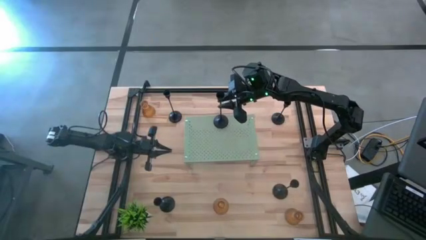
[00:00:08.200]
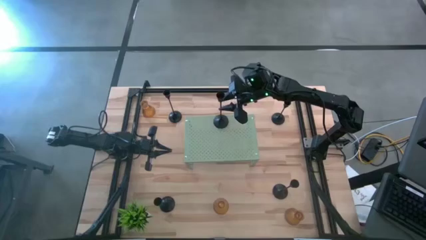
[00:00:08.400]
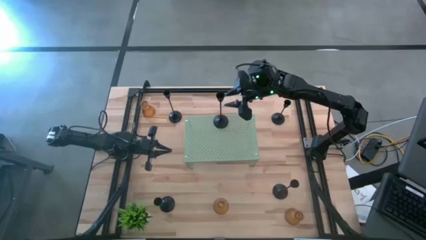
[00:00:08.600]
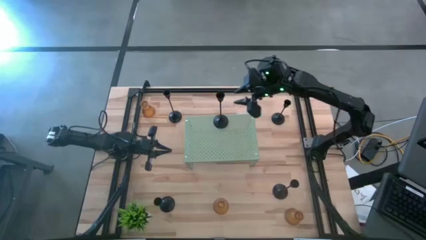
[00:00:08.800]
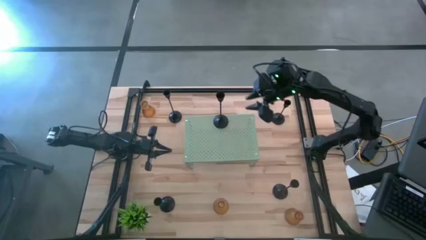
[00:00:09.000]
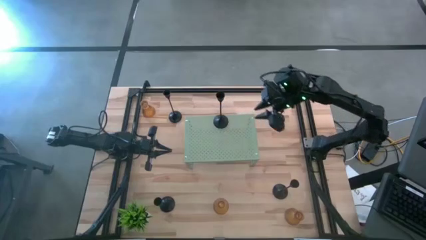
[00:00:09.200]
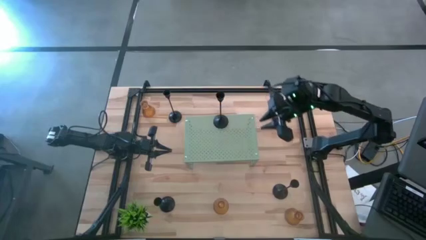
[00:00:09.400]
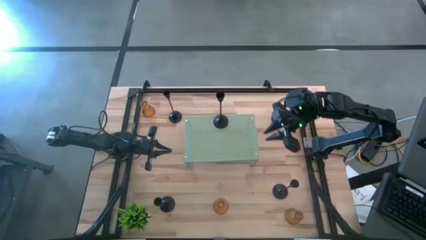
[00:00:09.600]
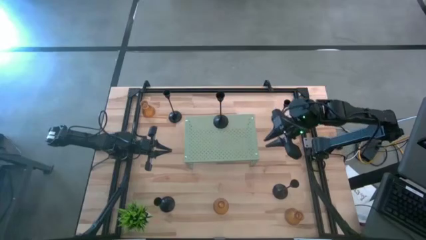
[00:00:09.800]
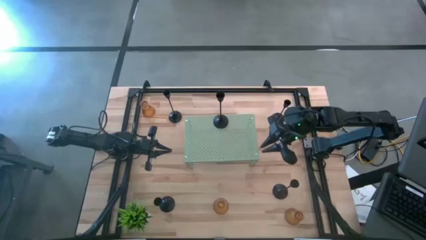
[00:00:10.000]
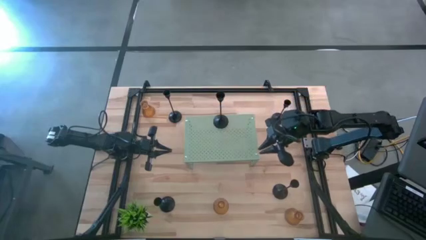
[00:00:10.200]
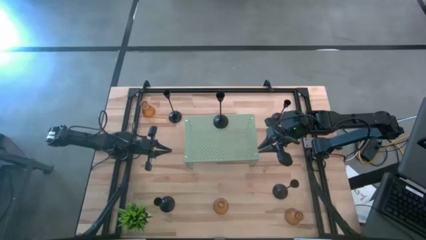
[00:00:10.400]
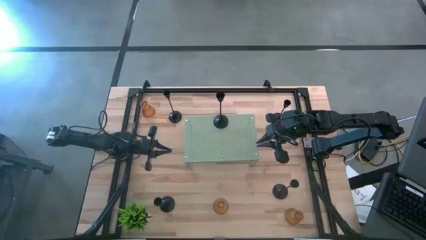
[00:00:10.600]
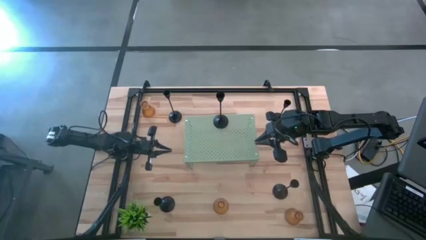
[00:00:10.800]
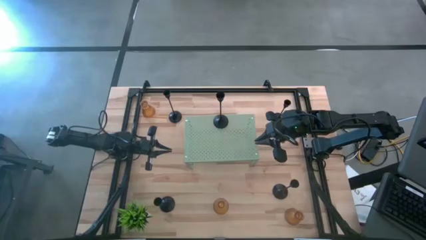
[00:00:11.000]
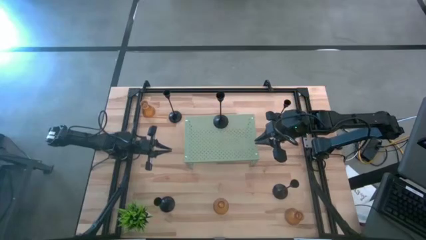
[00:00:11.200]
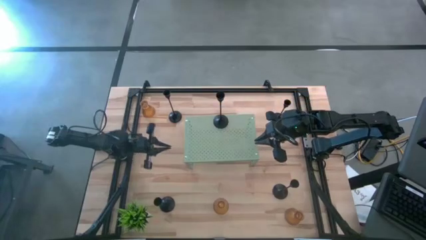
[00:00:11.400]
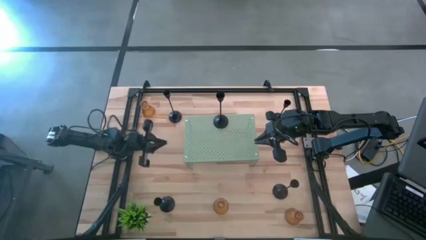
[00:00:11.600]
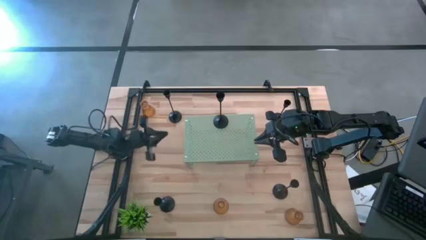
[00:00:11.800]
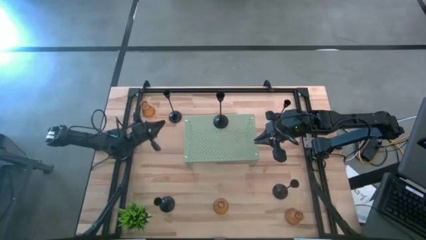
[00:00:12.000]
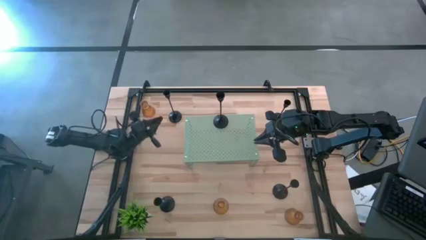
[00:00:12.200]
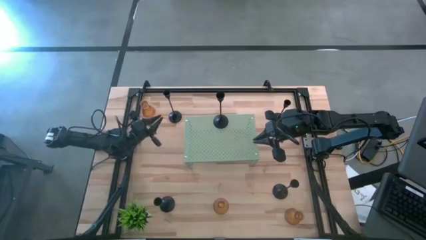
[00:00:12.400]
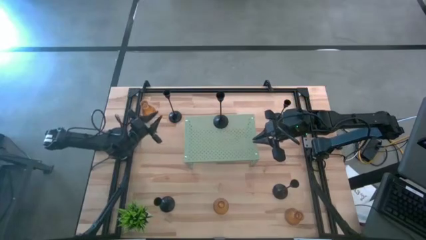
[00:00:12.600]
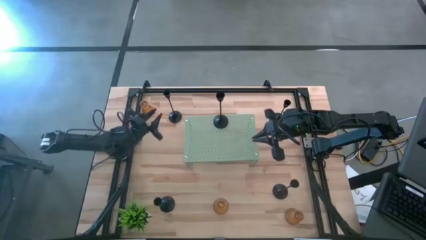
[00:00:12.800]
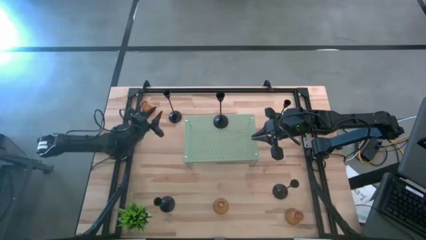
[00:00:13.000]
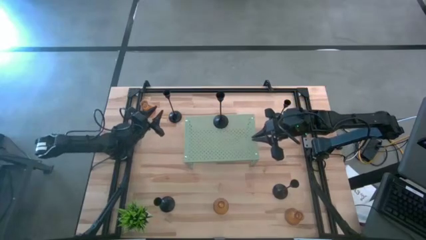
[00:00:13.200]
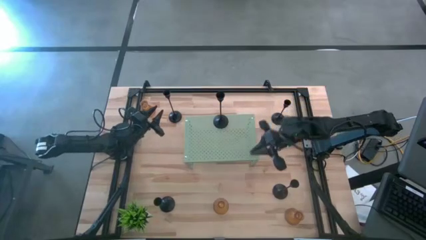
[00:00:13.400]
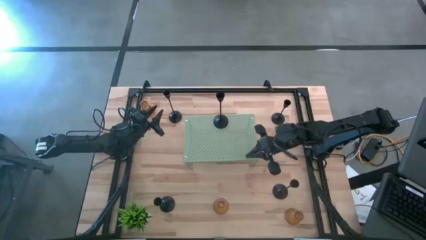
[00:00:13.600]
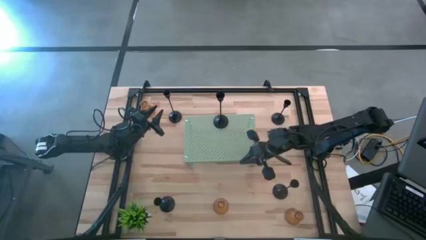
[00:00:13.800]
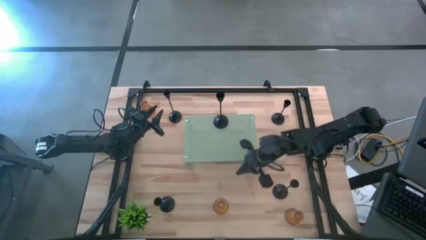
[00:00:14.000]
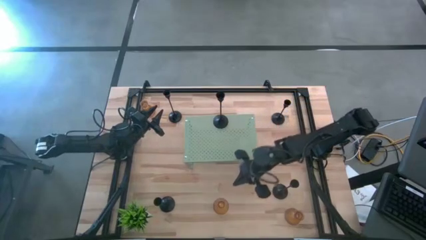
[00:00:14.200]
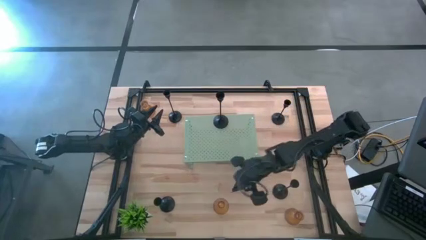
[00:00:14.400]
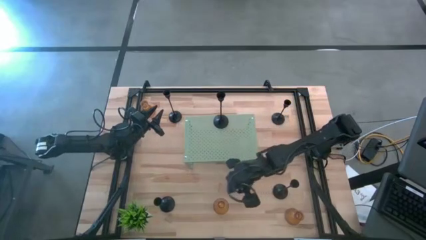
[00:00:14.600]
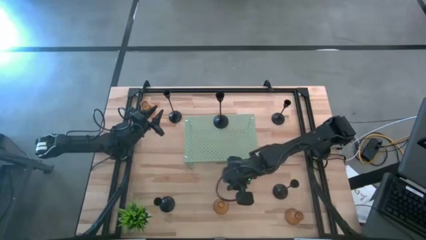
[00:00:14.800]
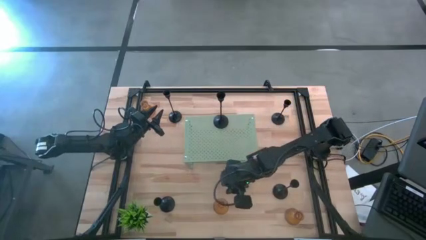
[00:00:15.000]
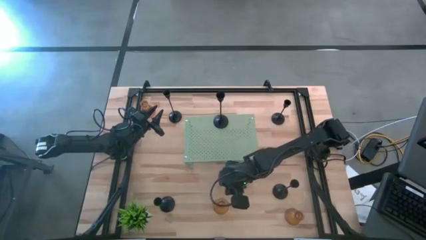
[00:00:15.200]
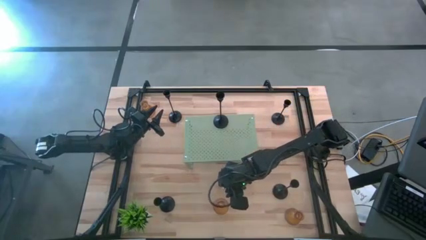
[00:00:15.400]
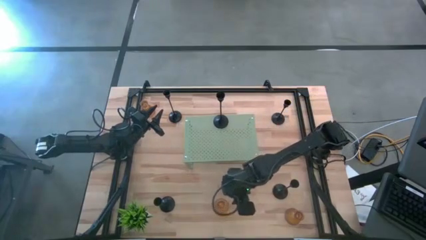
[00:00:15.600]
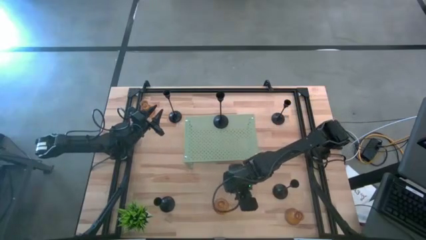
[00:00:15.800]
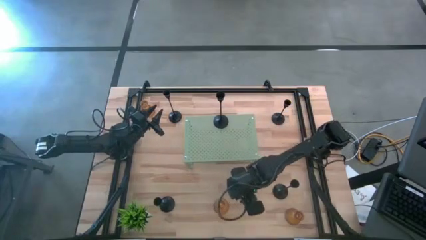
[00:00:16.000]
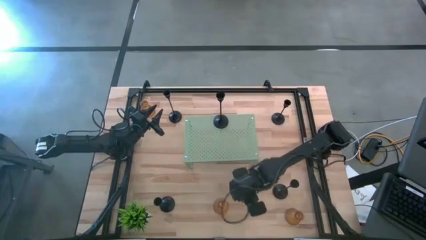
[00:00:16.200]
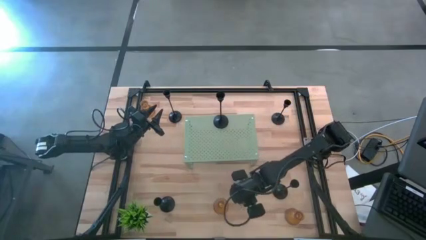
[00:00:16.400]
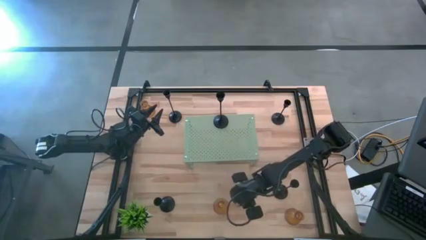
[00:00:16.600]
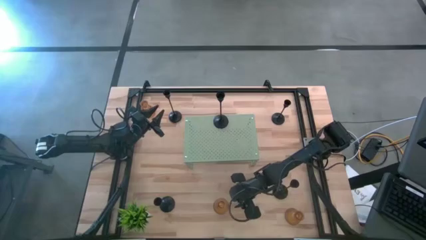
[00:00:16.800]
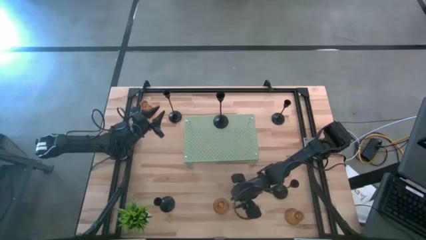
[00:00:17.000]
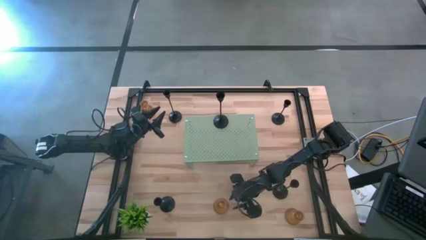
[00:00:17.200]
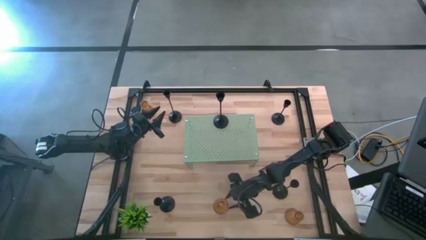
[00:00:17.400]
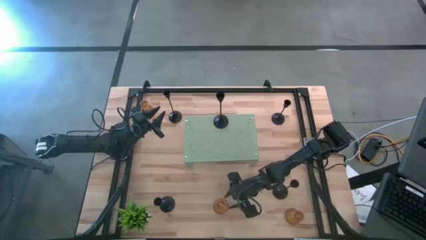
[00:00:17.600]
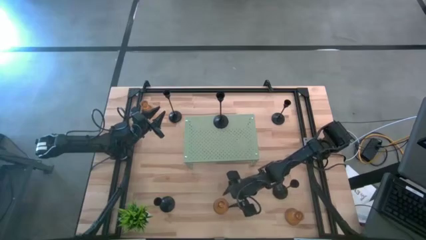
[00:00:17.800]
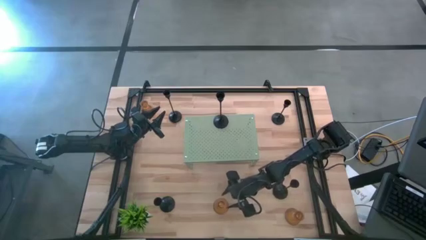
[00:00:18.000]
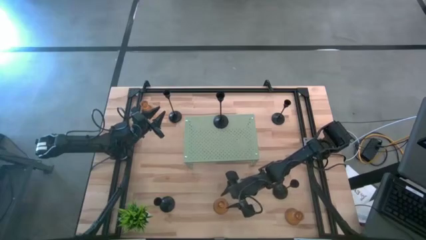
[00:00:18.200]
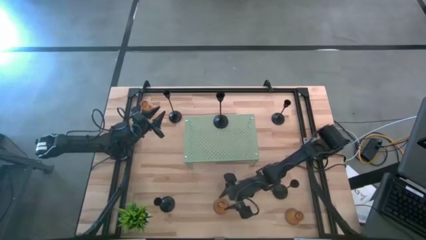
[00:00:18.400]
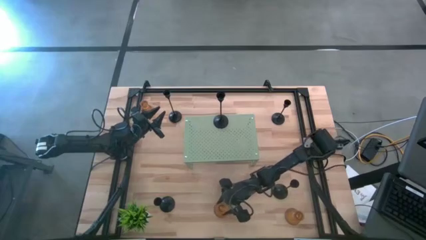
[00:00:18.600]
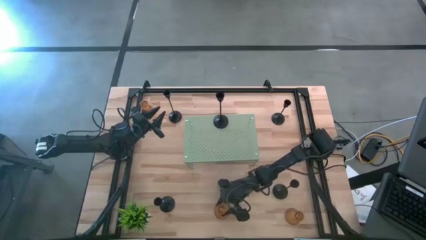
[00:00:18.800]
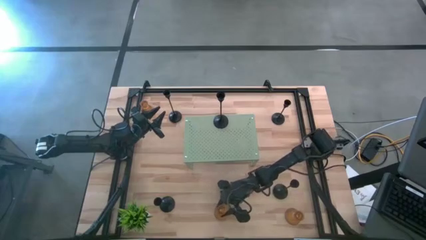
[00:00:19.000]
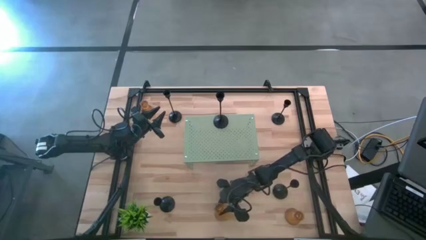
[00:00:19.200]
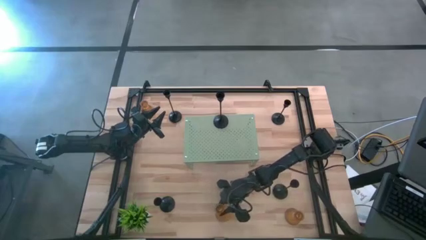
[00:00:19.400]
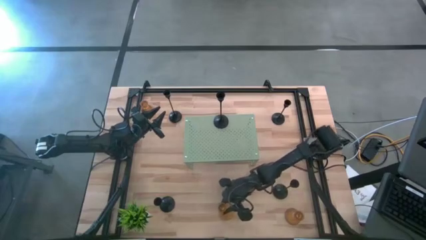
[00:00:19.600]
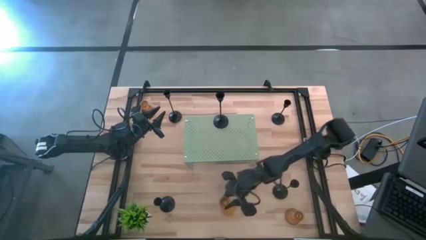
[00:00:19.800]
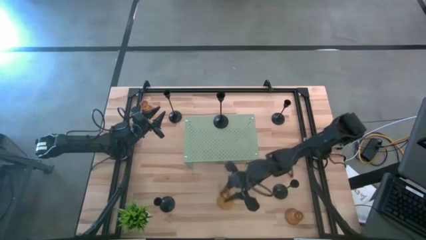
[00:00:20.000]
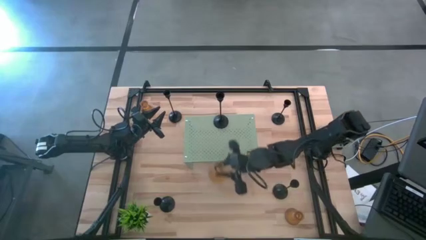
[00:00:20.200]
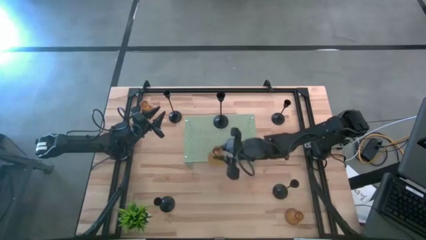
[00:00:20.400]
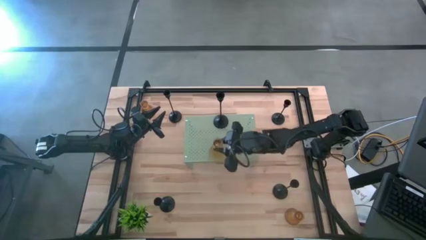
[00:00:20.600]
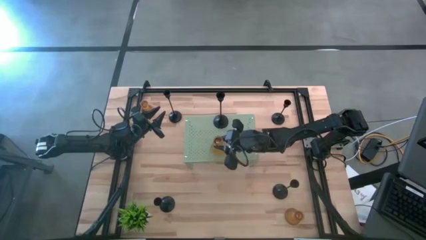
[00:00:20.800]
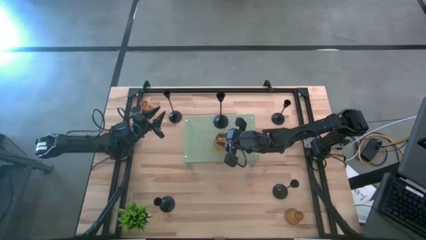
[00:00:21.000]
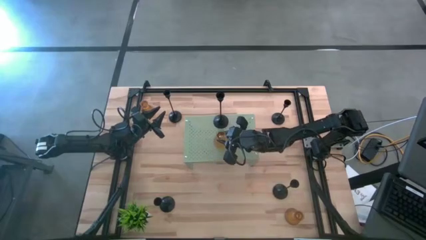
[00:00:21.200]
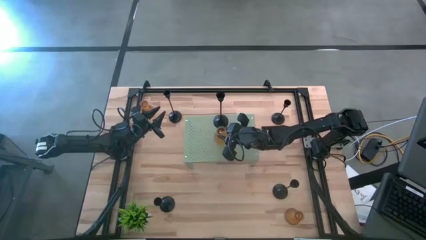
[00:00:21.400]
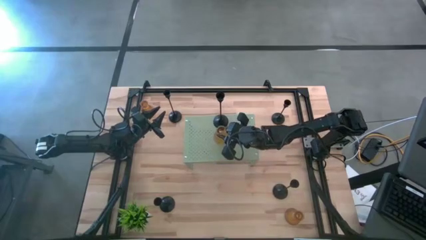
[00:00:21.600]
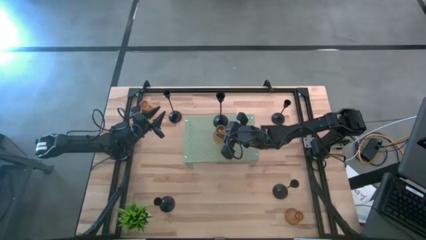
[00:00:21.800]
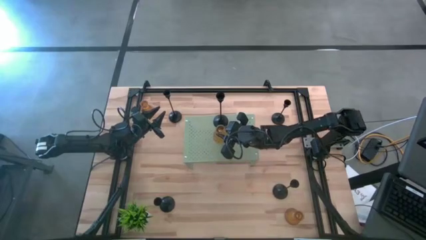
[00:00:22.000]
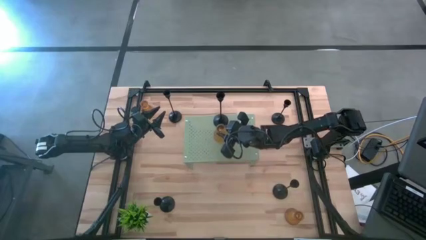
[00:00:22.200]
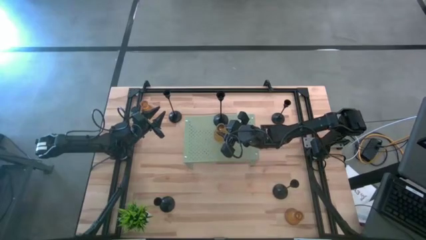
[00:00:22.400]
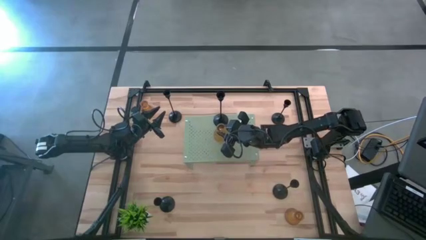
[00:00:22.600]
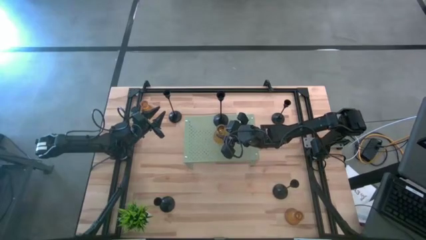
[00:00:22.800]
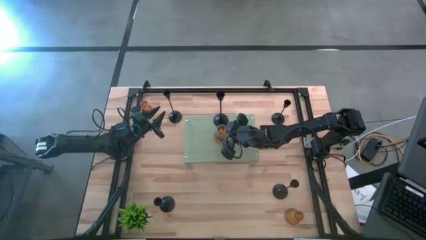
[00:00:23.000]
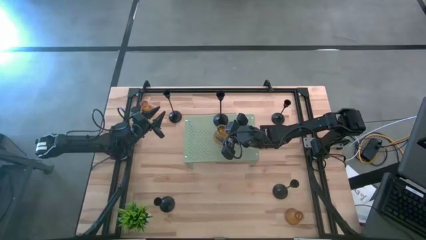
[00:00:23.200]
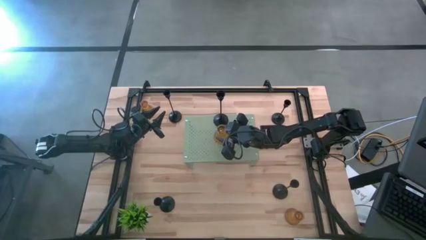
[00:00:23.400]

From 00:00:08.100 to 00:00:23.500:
Task: Pick & Place candle stick holders
Align the bottom left yellow candle holder with the black candle holder on the shelf
